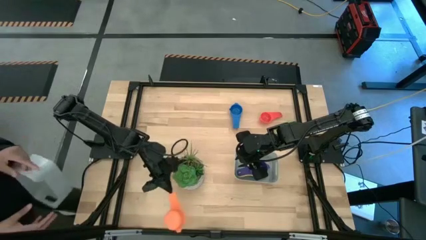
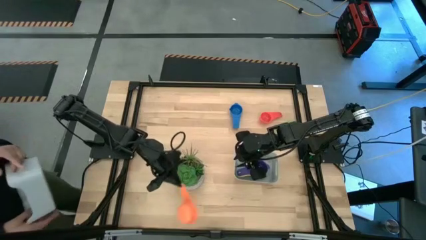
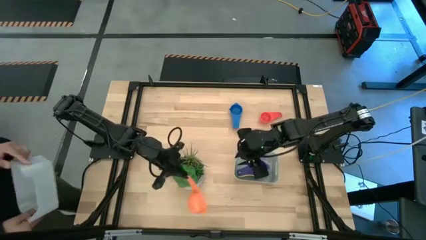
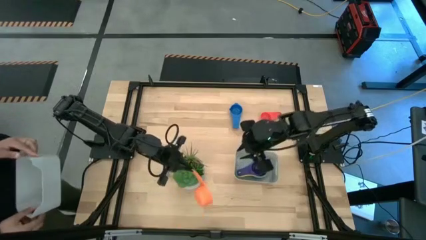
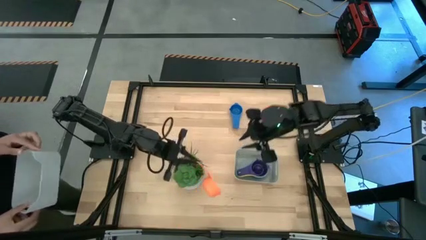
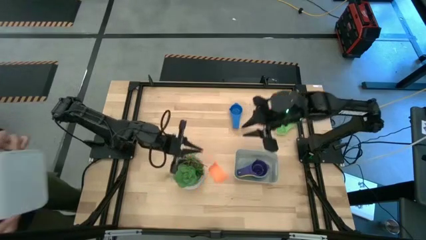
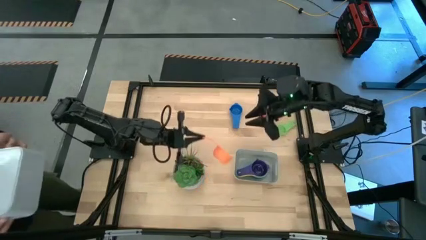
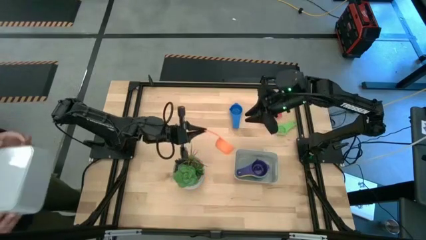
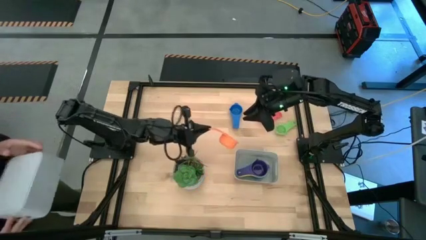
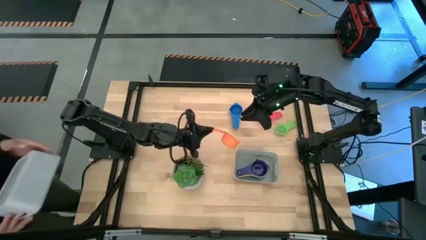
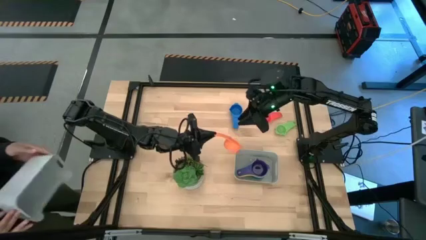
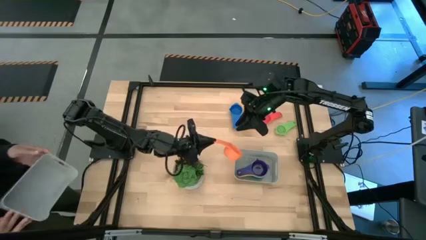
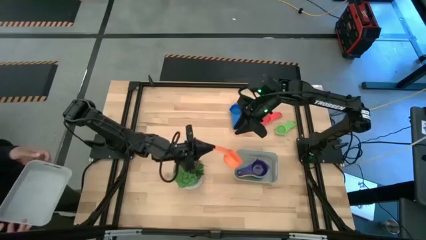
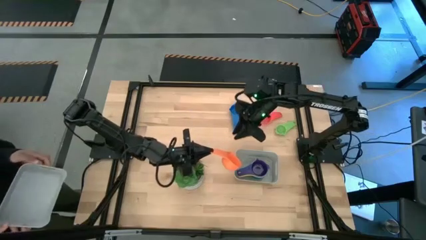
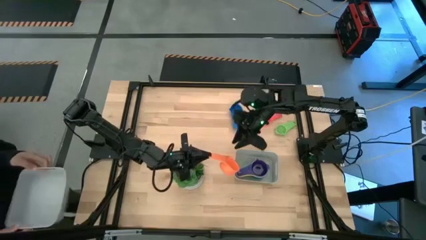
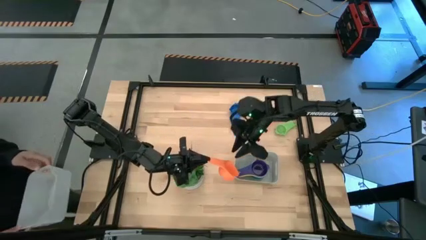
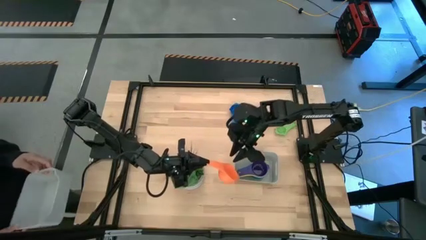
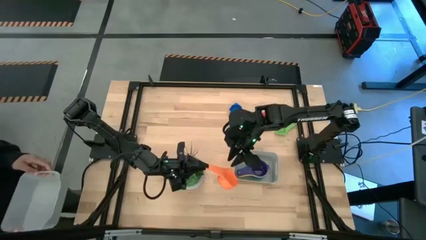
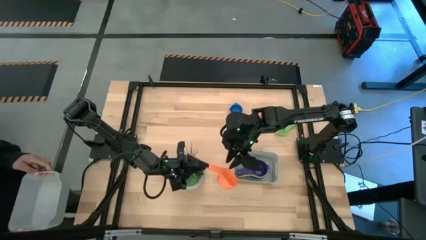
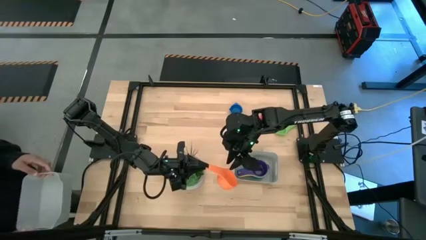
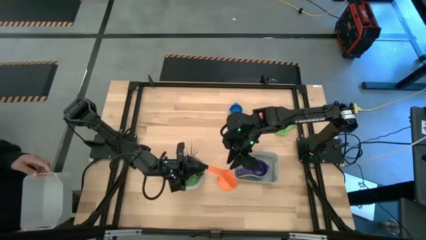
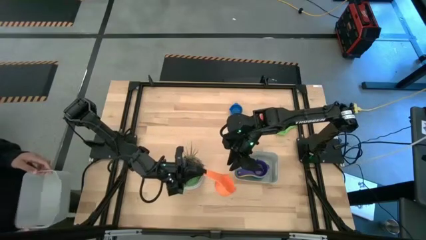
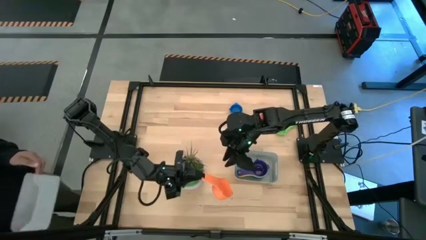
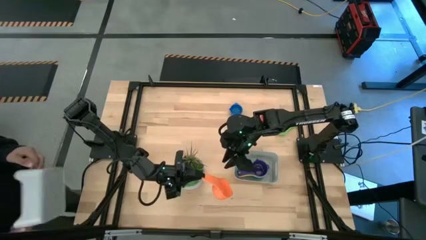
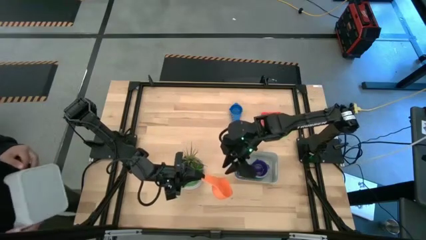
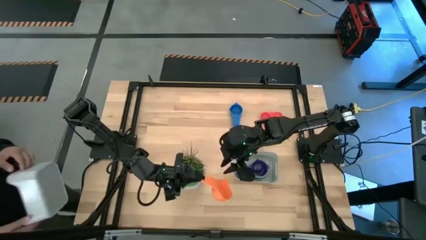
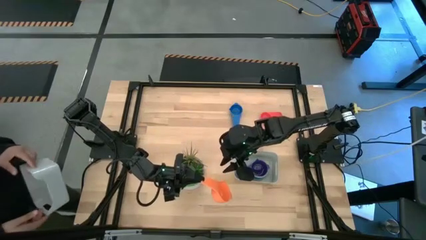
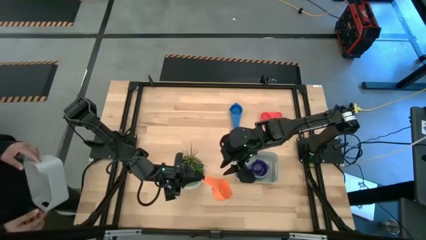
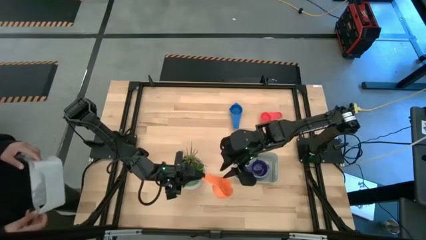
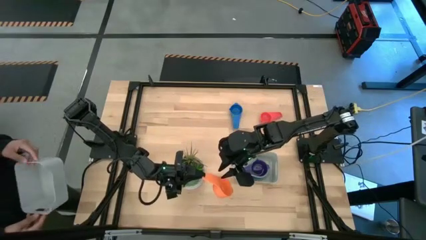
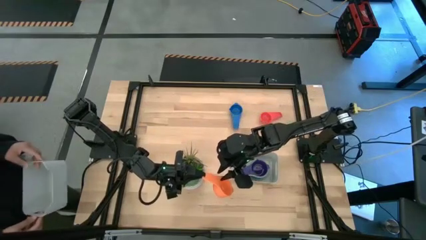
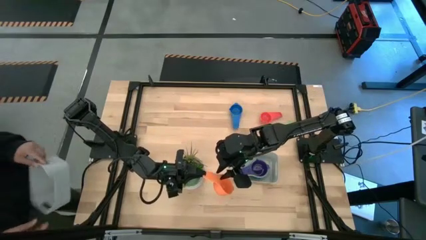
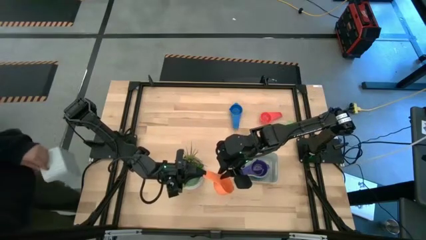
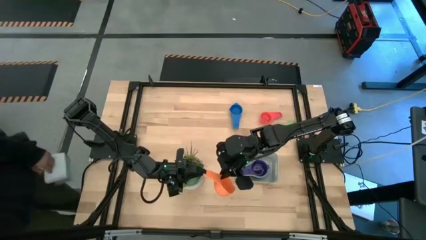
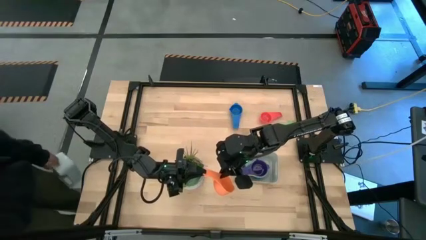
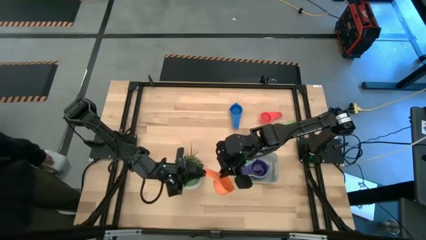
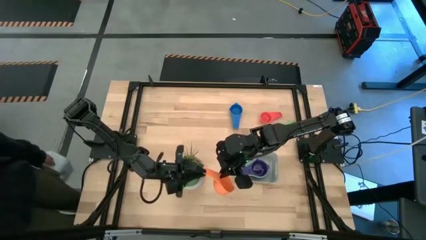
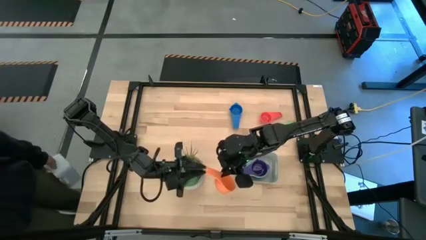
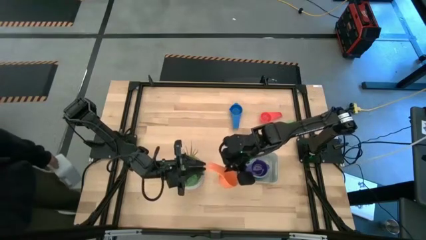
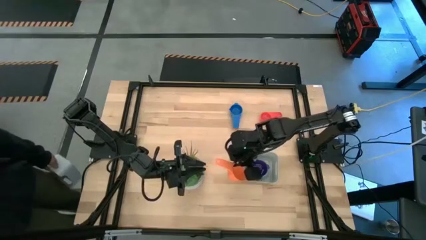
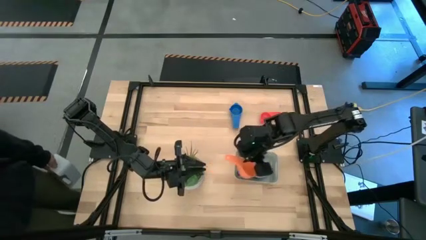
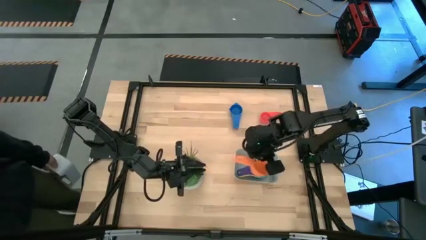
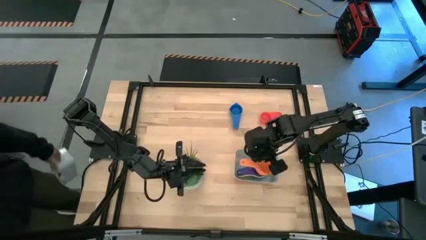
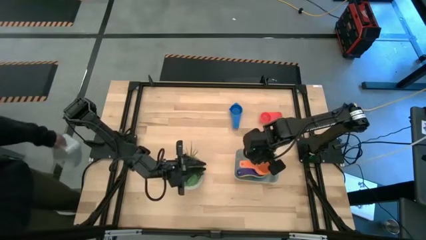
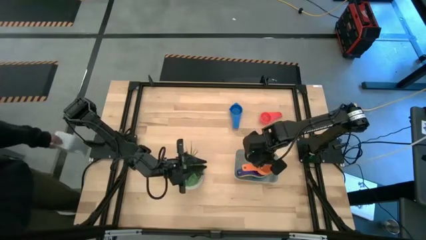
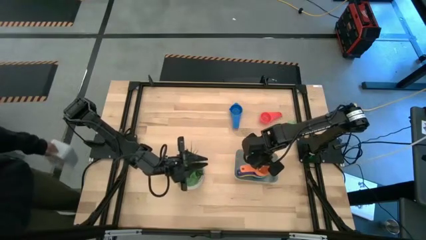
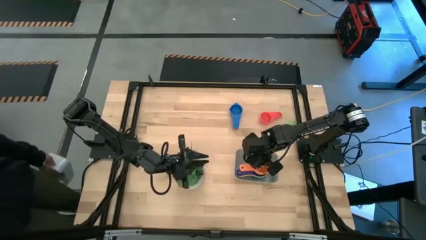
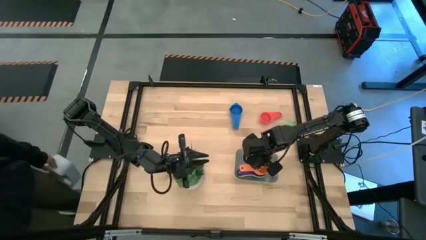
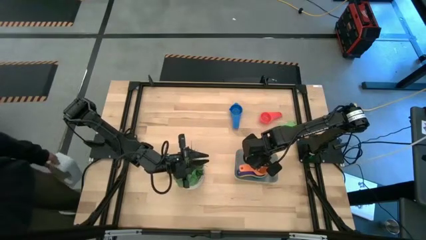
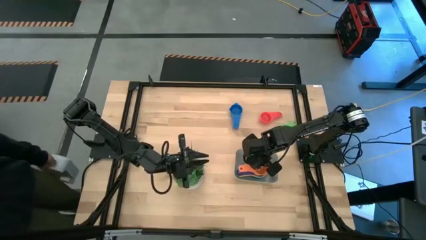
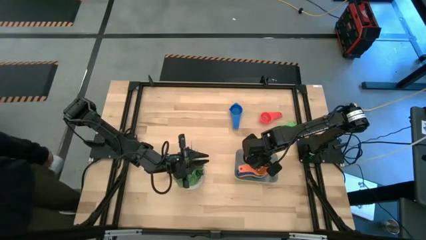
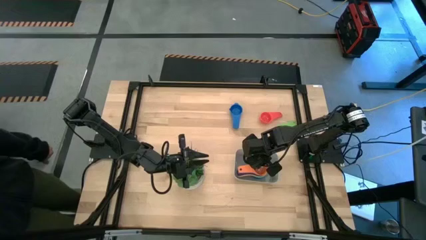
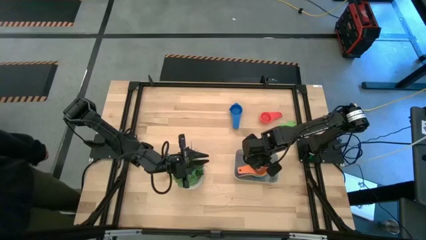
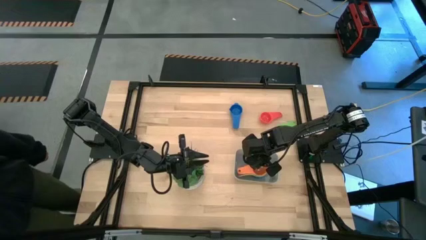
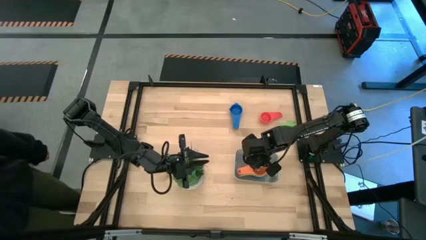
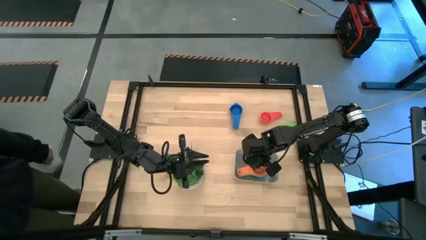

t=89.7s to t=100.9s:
Task: Nest measuring cups in basket
Stack the orange measuring cup on top the blue measuring cup in the grey bin
